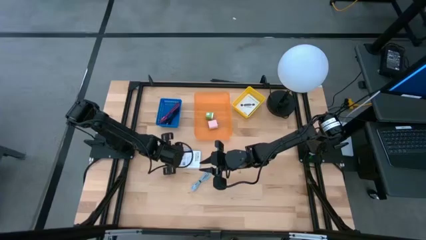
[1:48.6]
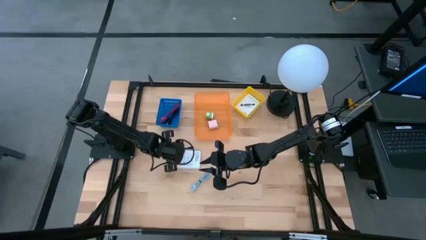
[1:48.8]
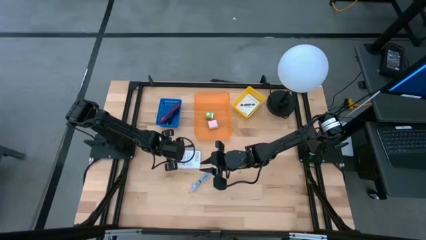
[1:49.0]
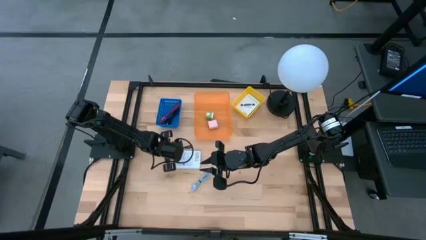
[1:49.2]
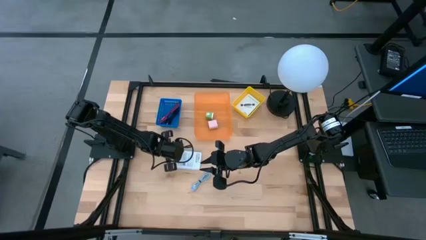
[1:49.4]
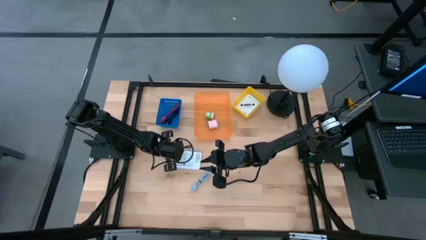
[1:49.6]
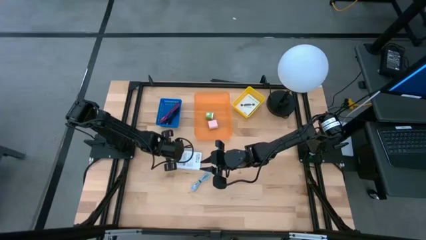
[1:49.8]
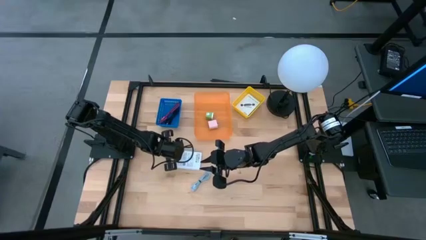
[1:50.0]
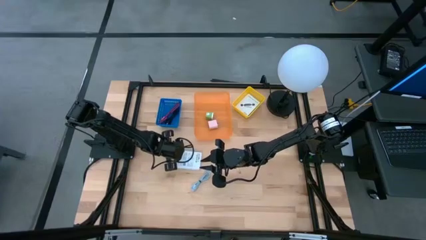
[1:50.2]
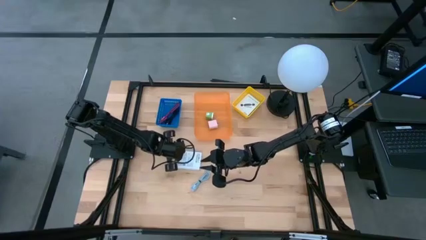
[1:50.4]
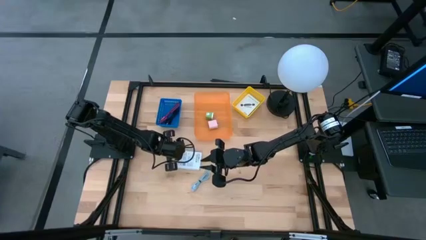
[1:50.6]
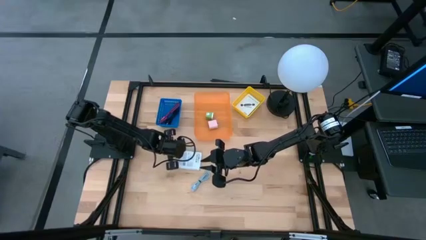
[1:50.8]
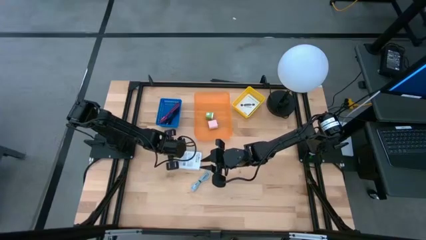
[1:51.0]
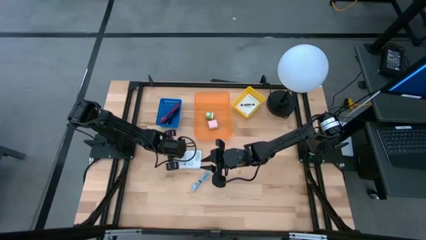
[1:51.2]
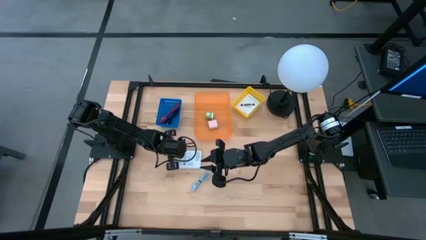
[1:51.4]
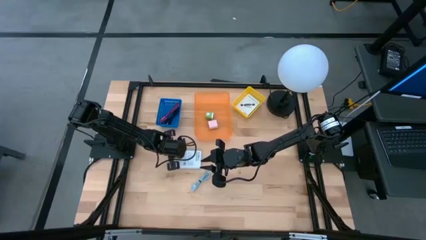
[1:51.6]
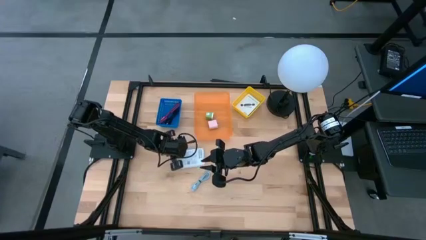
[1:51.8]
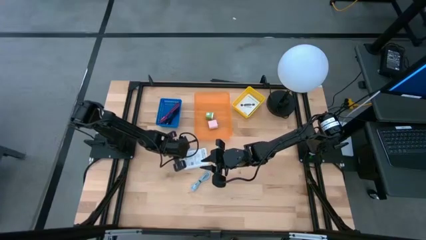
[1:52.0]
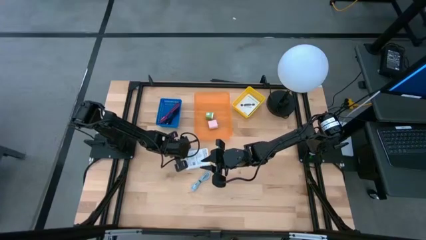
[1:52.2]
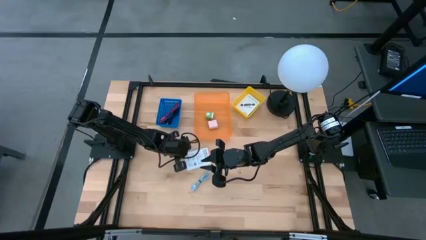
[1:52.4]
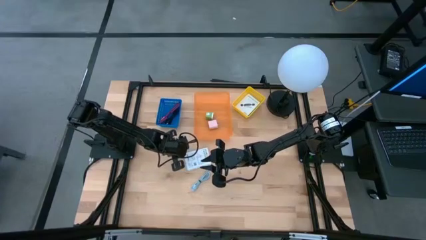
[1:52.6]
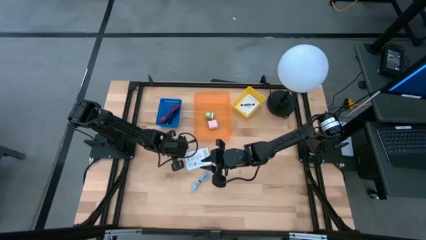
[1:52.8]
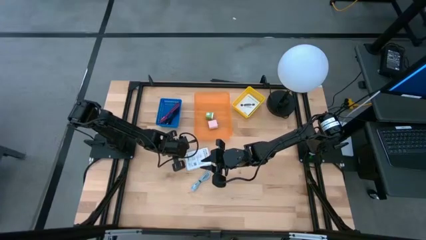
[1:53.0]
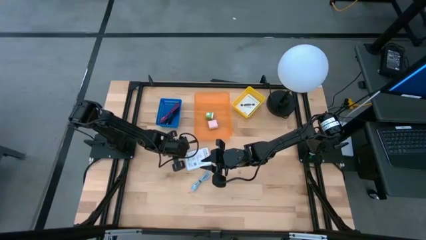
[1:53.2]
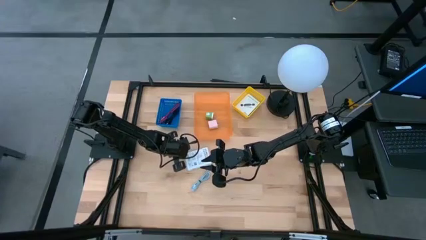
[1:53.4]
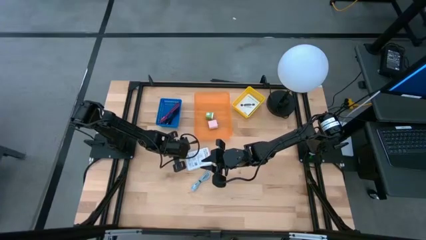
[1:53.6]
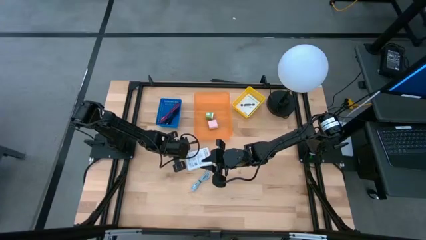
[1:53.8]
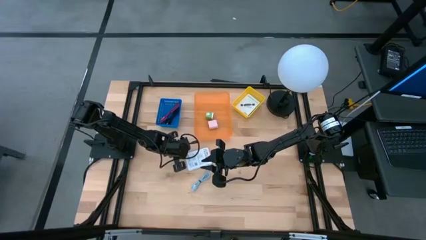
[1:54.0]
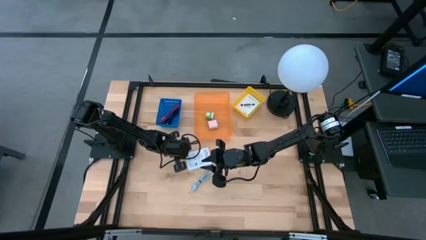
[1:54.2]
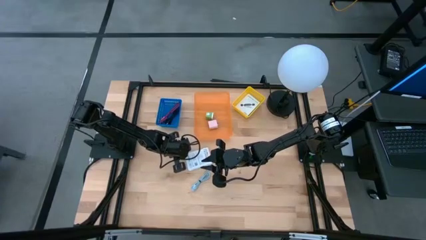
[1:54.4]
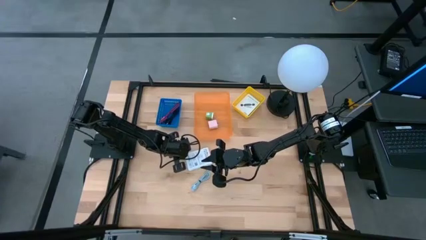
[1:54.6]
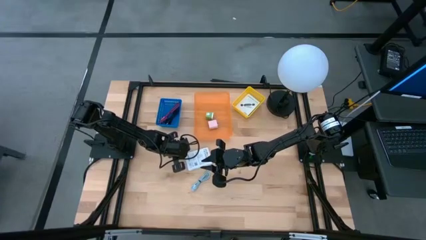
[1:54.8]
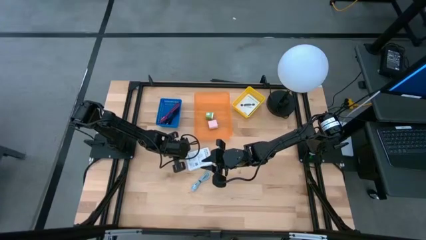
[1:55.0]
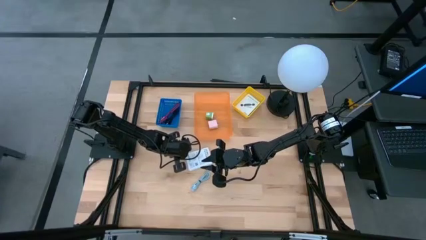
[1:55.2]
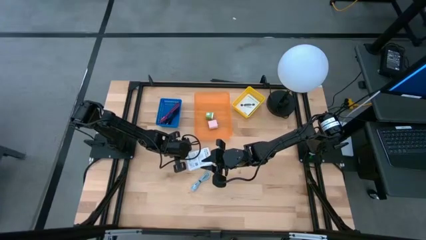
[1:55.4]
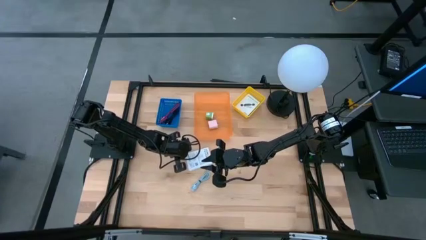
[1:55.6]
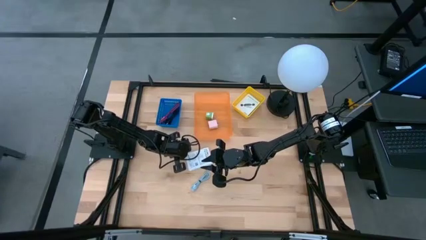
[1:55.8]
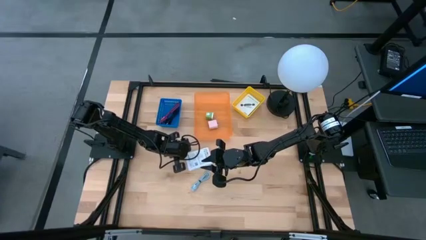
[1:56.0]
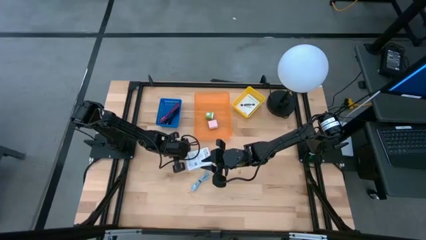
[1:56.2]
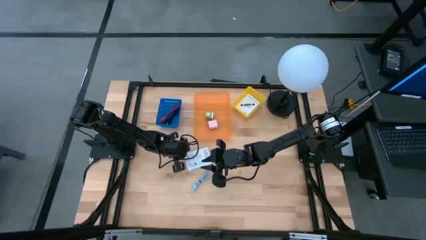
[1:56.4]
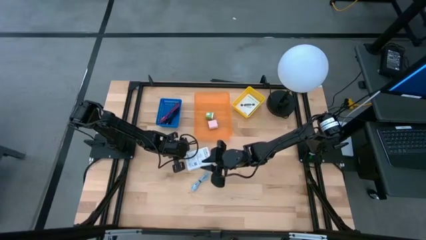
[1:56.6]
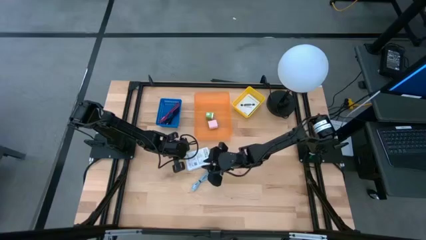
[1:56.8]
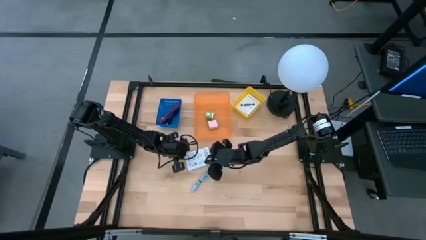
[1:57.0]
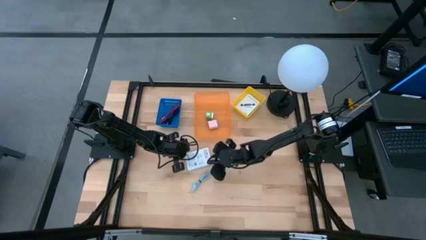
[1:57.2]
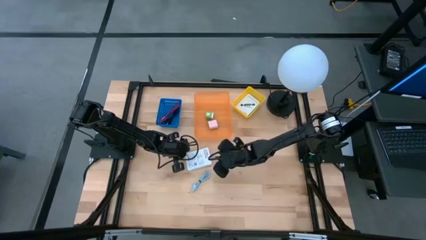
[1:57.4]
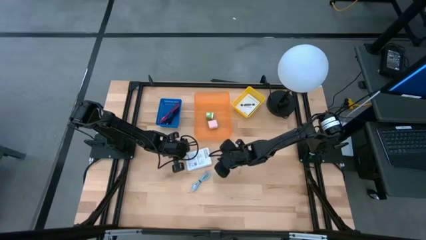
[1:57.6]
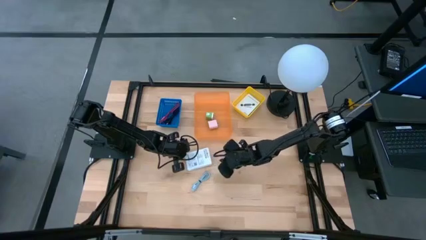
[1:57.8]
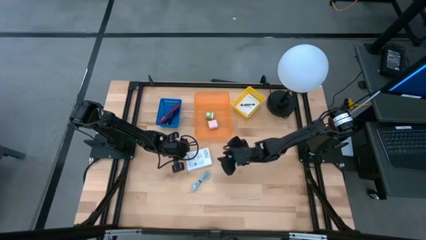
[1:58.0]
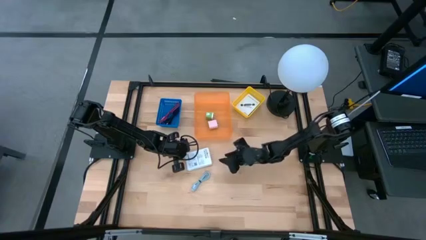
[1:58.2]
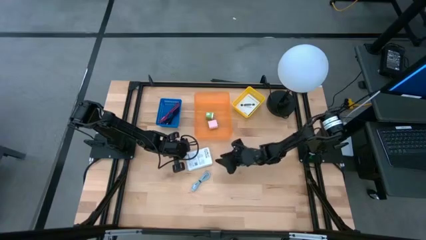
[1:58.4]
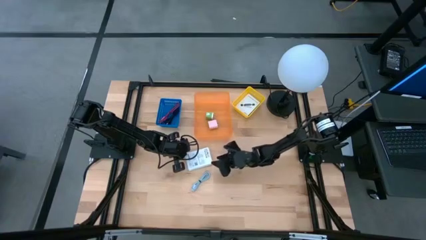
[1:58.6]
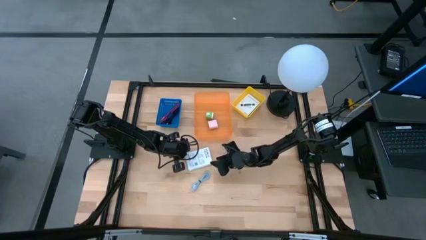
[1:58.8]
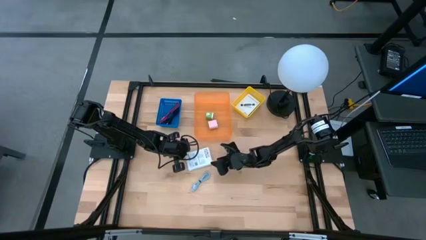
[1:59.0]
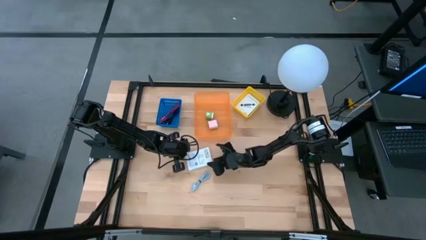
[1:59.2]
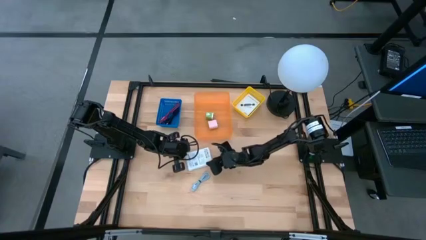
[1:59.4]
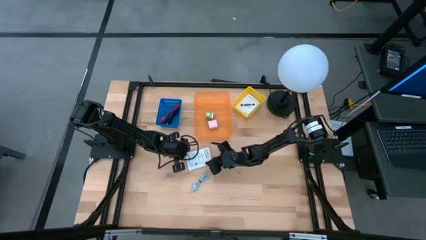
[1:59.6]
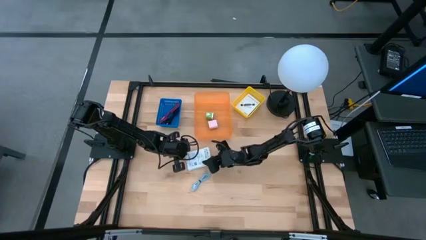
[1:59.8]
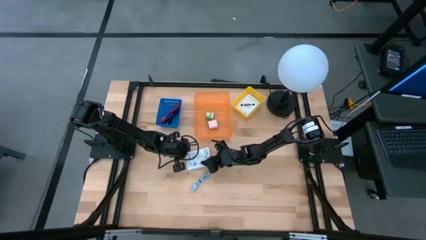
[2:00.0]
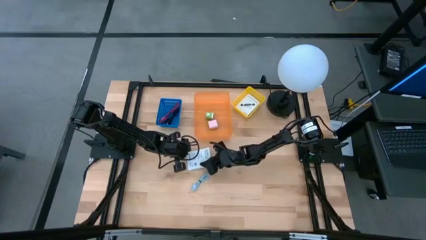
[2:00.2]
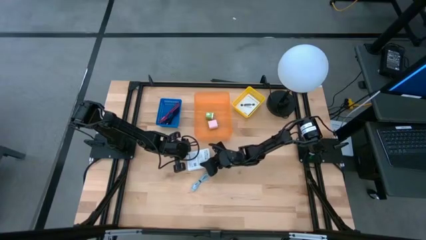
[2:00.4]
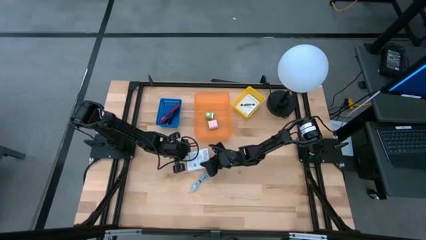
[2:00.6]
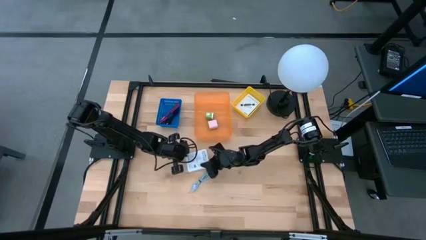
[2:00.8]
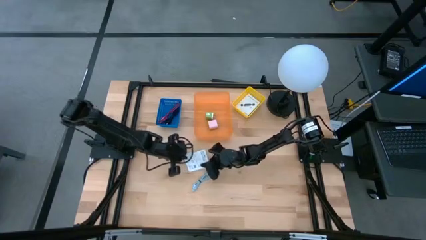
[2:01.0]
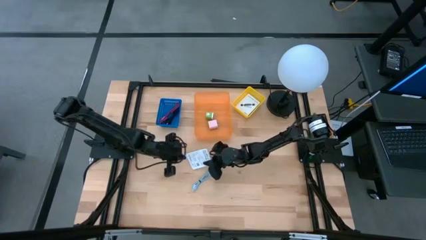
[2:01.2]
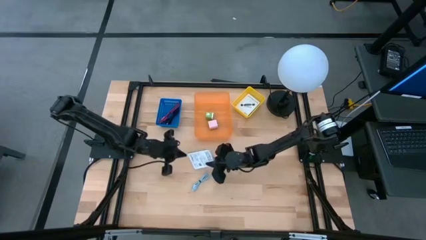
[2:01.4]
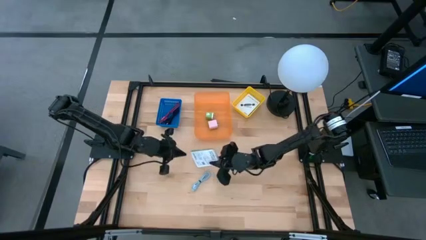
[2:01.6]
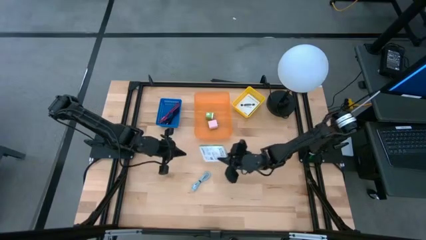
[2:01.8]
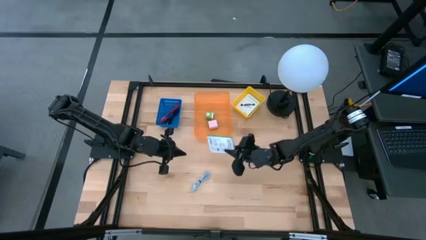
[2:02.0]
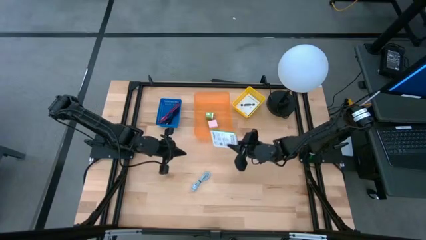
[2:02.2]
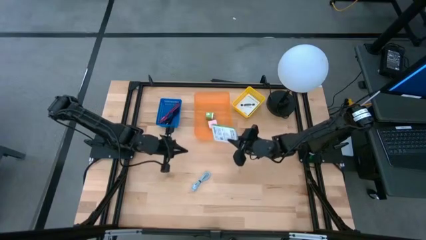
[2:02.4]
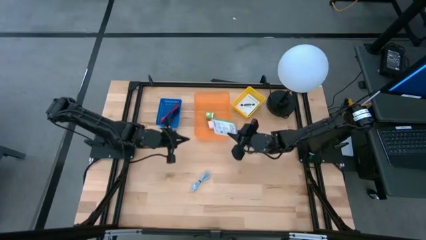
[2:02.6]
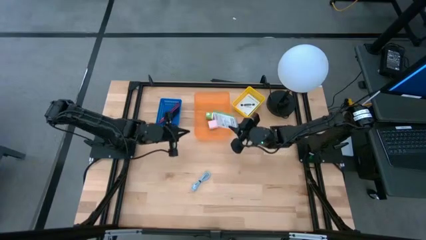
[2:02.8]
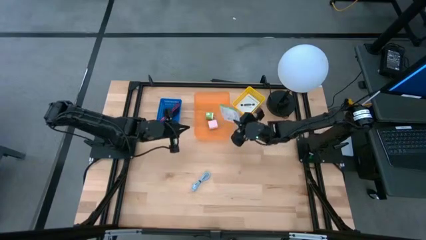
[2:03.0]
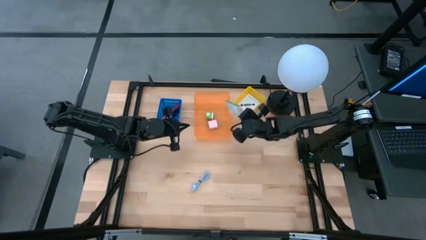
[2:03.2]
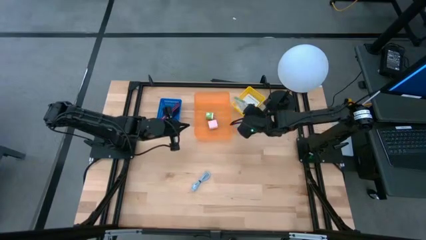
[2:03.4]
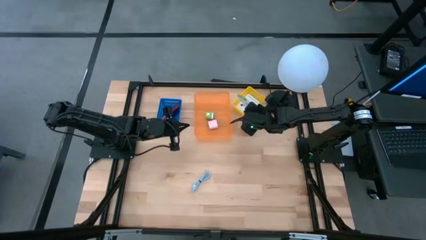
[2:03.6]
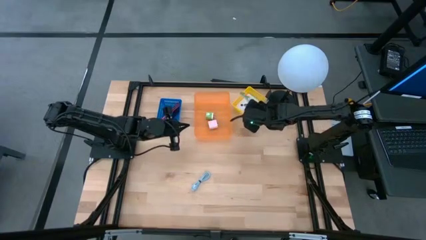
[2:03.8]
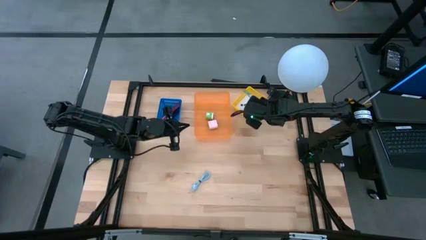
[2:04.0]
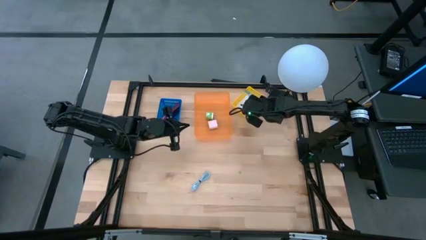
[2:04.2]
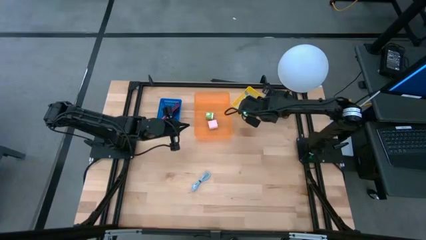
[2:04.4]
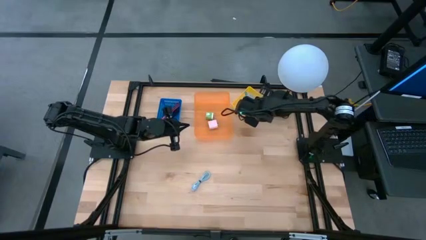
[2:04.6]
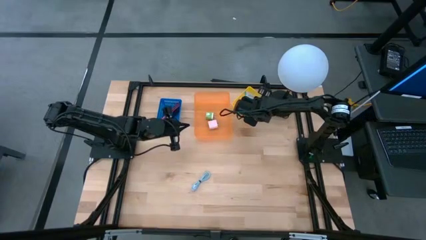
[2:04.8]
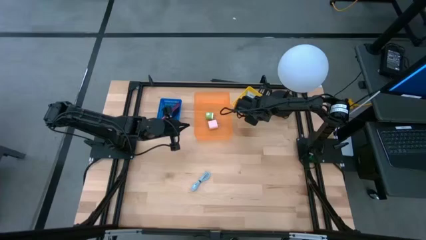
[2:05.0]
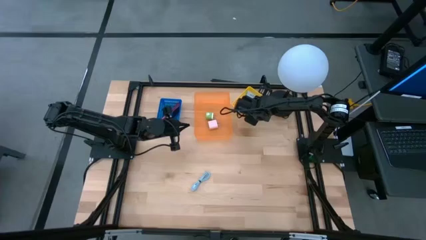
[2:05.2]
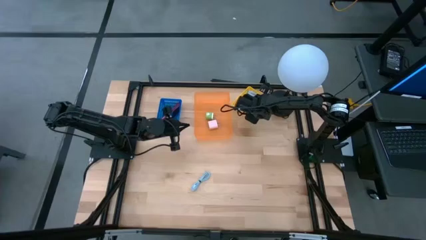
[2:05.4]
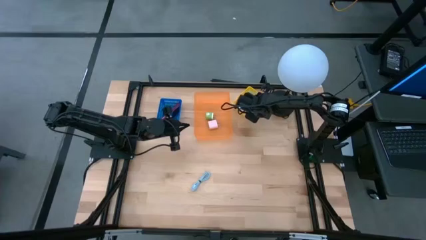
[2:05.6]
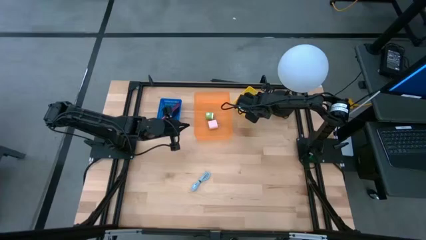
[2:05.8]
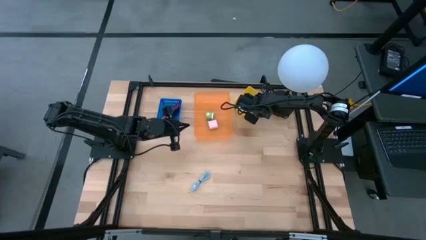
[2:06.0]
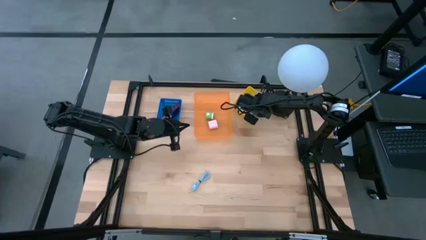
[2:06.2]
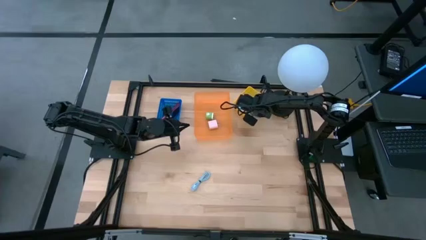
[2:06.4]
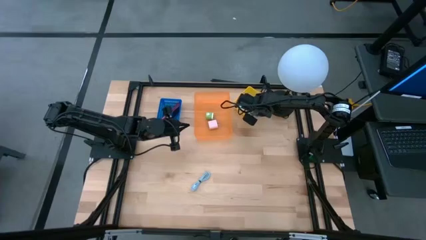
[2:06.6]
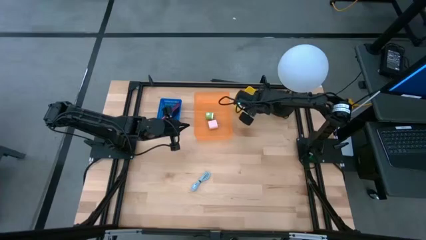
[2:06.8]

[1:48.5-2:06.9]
Task: Pick and place items into bin
Put the left card reader box into the yellow basket
